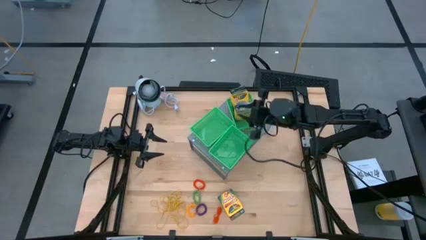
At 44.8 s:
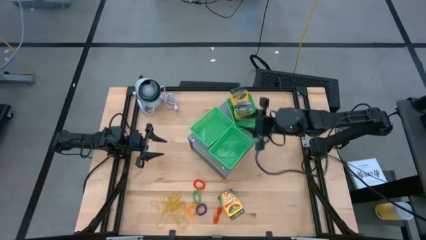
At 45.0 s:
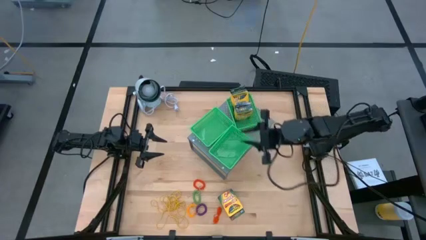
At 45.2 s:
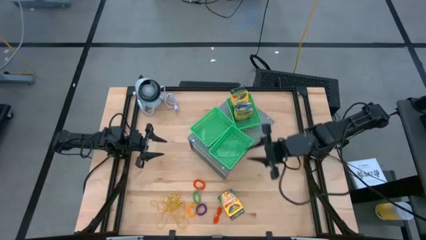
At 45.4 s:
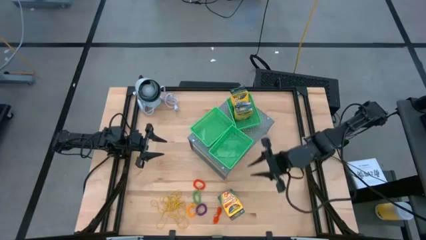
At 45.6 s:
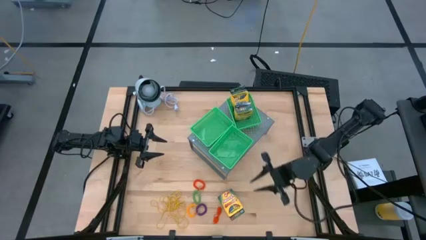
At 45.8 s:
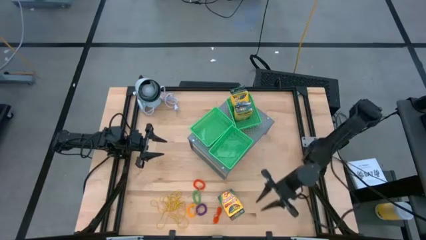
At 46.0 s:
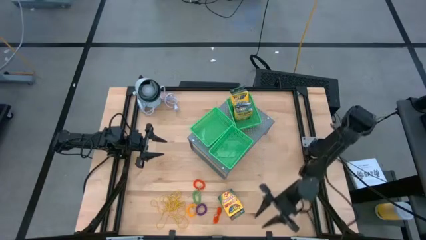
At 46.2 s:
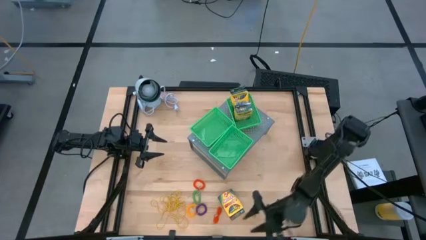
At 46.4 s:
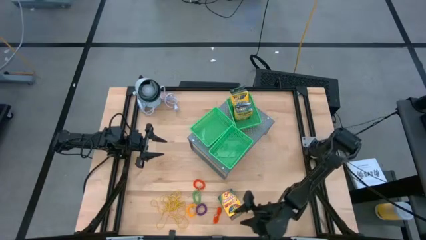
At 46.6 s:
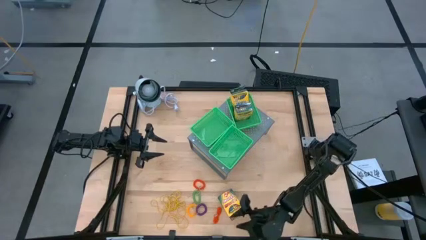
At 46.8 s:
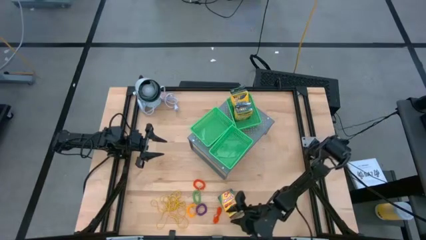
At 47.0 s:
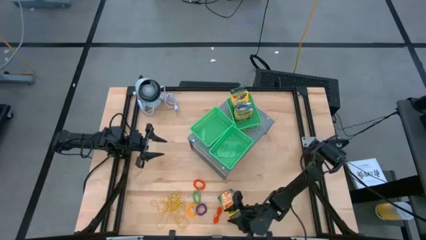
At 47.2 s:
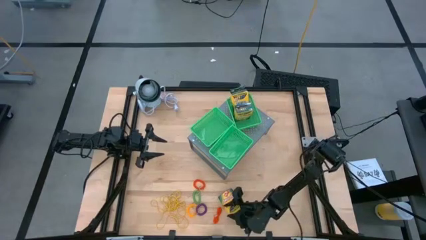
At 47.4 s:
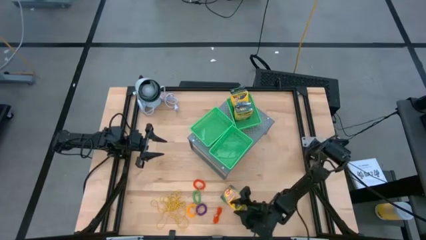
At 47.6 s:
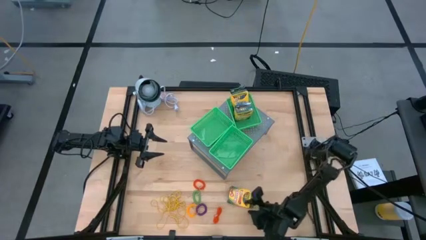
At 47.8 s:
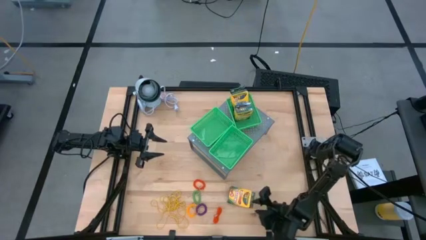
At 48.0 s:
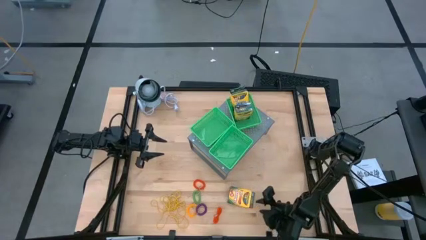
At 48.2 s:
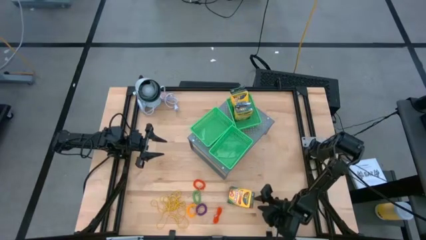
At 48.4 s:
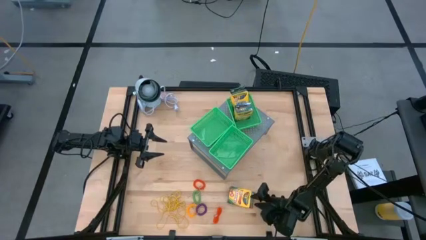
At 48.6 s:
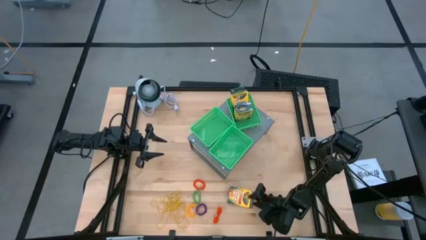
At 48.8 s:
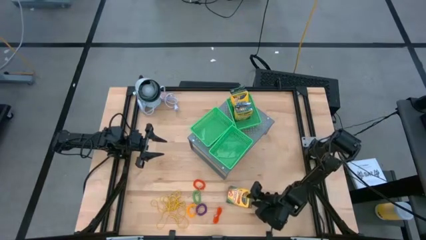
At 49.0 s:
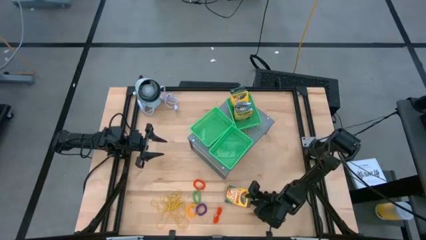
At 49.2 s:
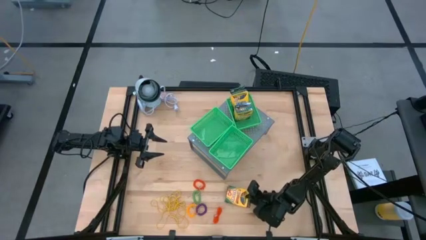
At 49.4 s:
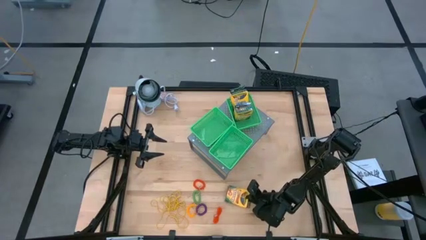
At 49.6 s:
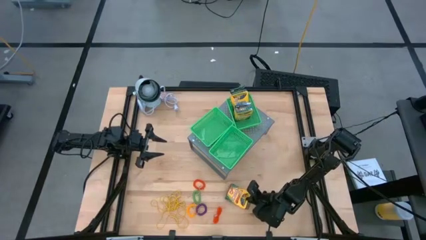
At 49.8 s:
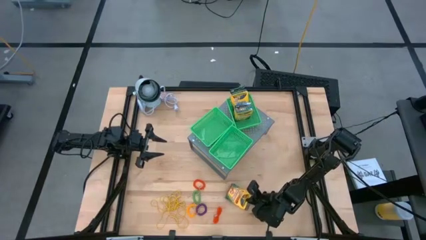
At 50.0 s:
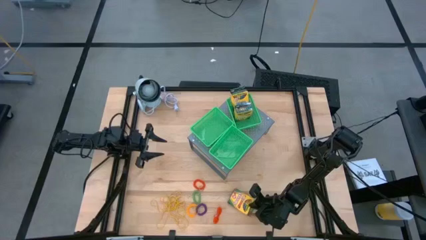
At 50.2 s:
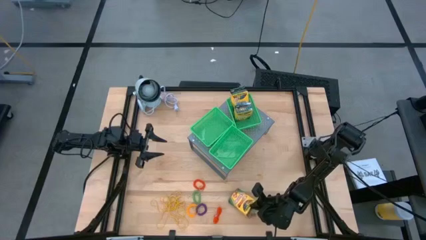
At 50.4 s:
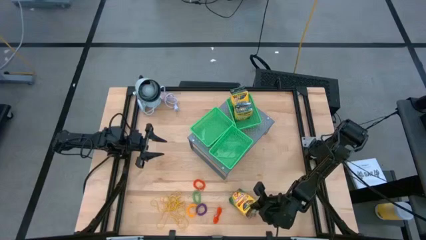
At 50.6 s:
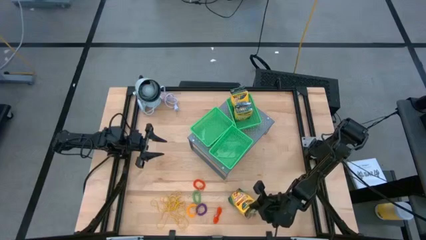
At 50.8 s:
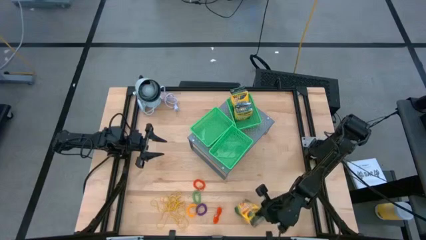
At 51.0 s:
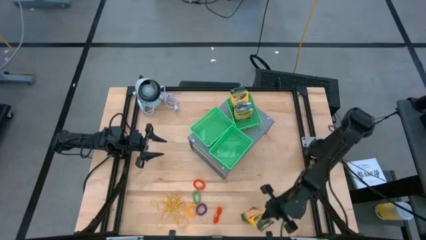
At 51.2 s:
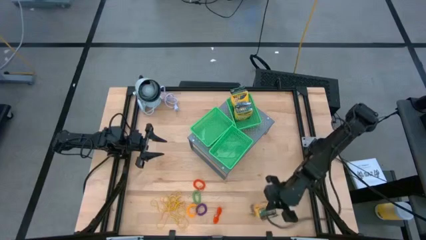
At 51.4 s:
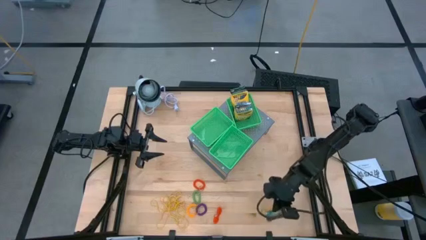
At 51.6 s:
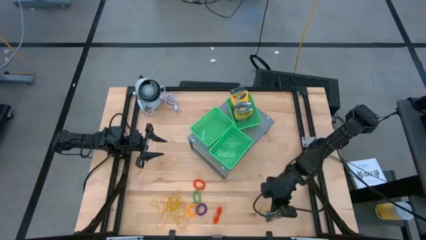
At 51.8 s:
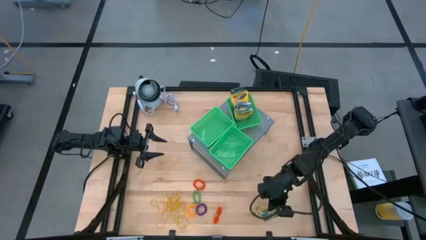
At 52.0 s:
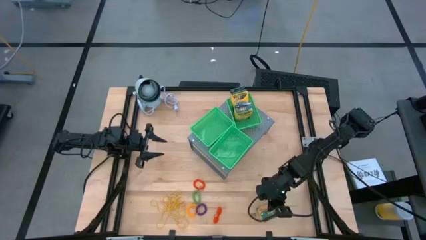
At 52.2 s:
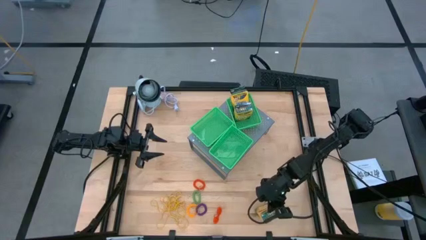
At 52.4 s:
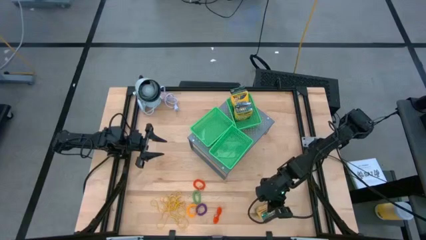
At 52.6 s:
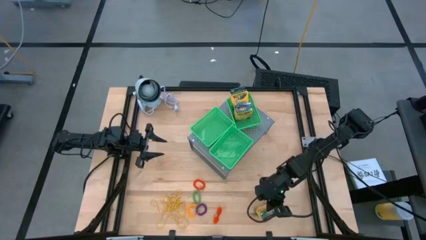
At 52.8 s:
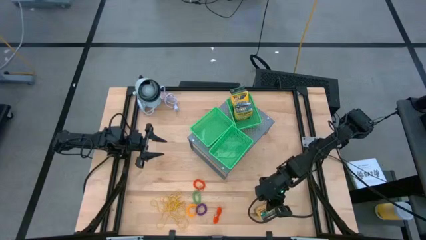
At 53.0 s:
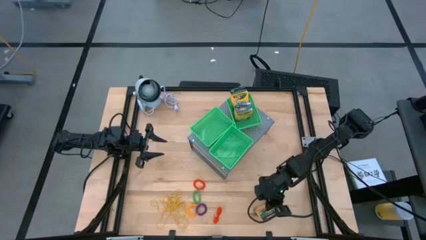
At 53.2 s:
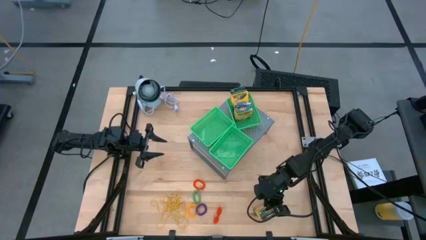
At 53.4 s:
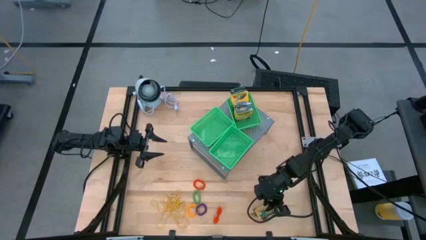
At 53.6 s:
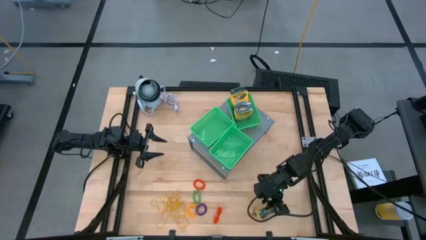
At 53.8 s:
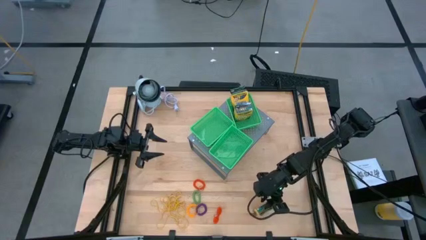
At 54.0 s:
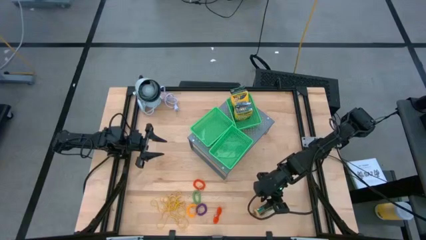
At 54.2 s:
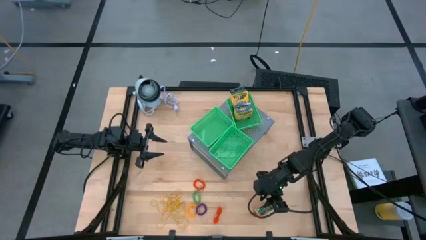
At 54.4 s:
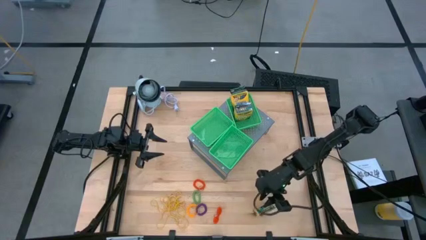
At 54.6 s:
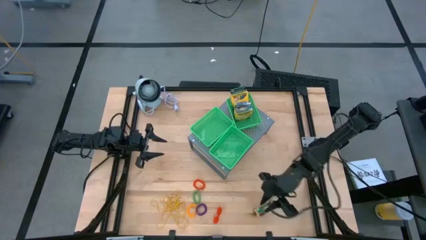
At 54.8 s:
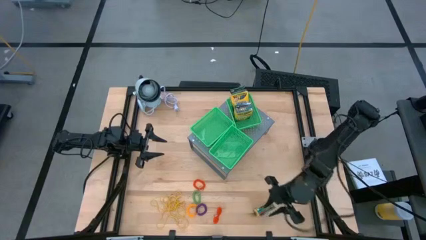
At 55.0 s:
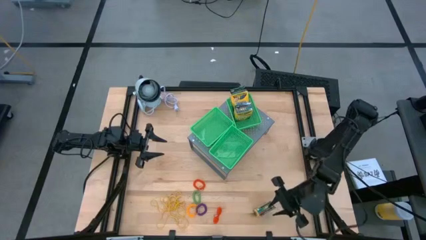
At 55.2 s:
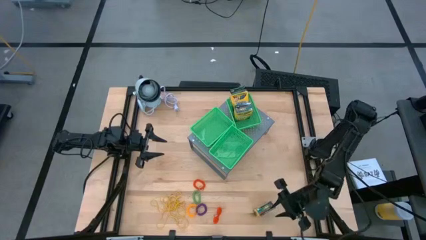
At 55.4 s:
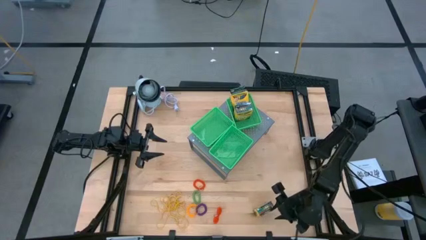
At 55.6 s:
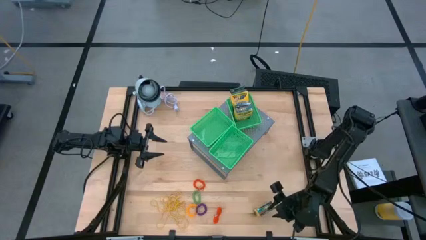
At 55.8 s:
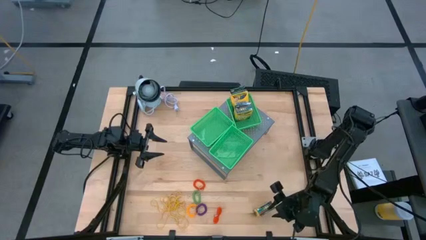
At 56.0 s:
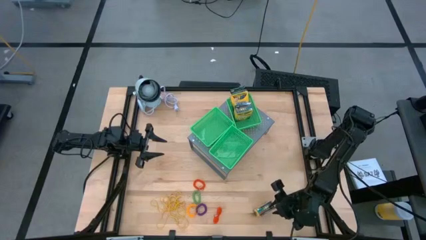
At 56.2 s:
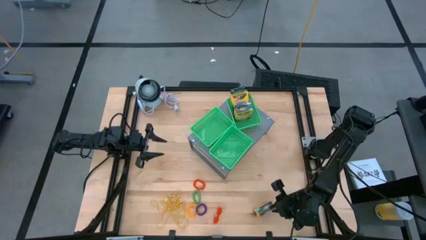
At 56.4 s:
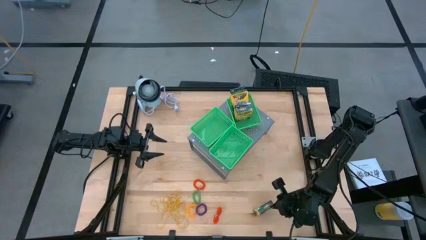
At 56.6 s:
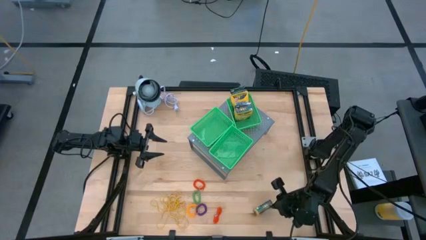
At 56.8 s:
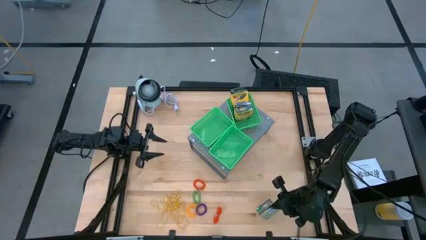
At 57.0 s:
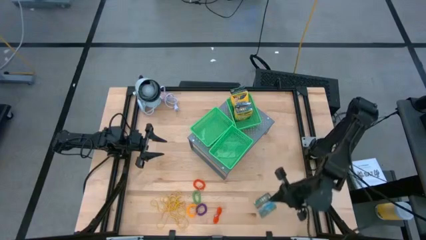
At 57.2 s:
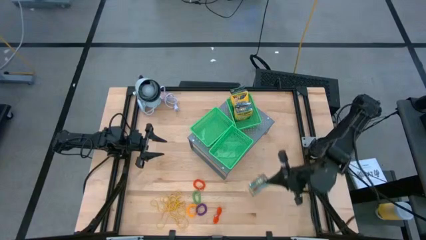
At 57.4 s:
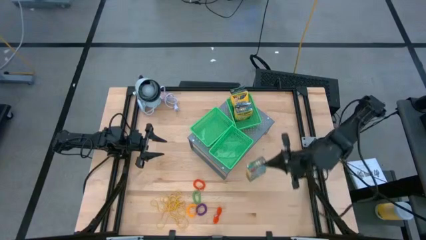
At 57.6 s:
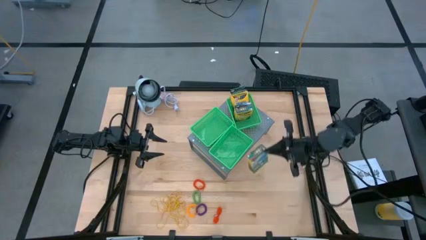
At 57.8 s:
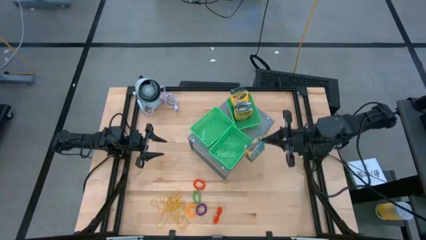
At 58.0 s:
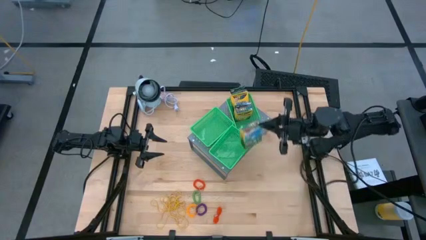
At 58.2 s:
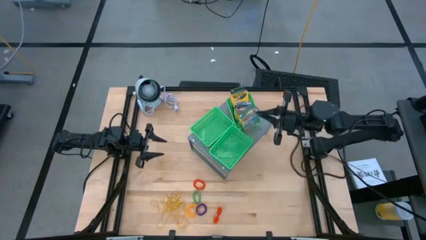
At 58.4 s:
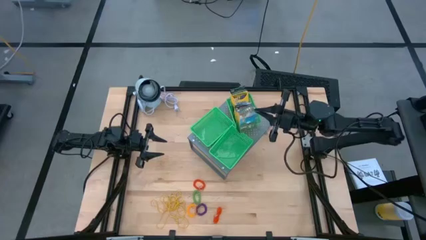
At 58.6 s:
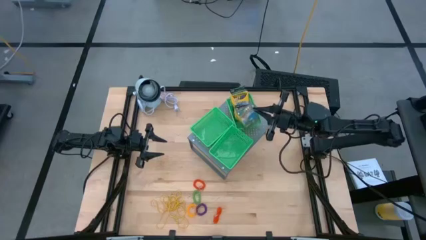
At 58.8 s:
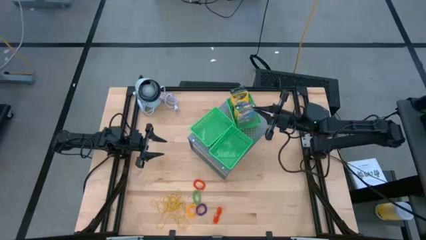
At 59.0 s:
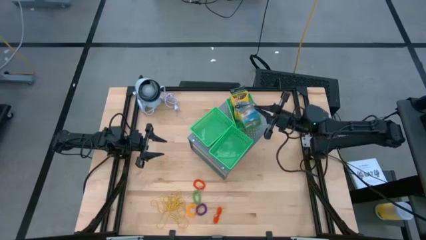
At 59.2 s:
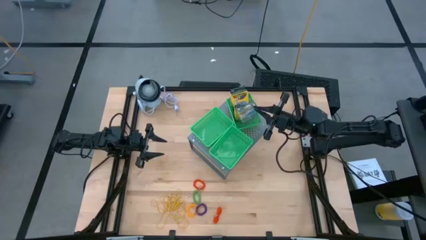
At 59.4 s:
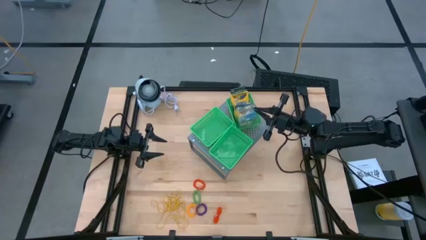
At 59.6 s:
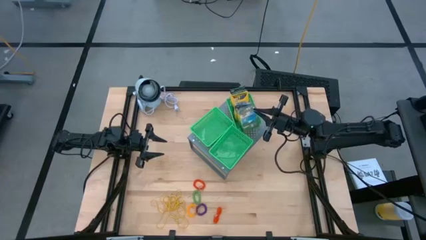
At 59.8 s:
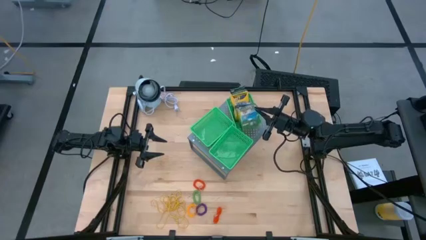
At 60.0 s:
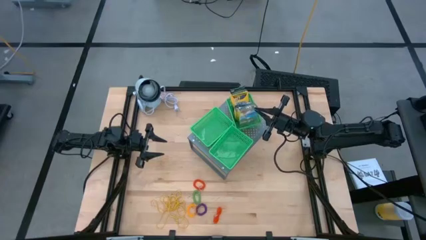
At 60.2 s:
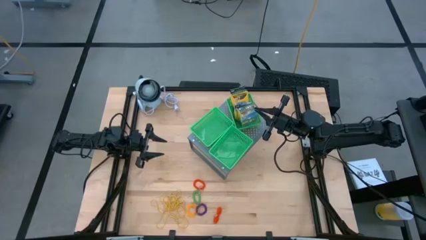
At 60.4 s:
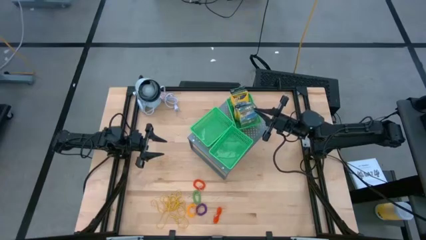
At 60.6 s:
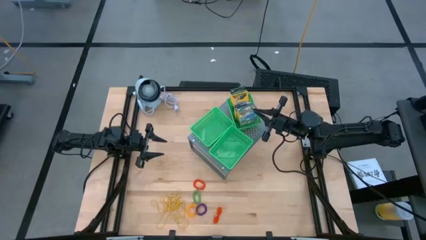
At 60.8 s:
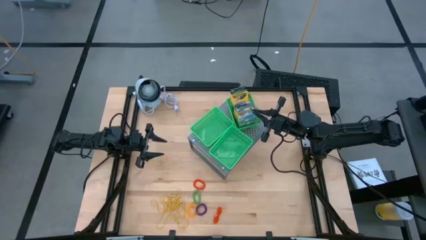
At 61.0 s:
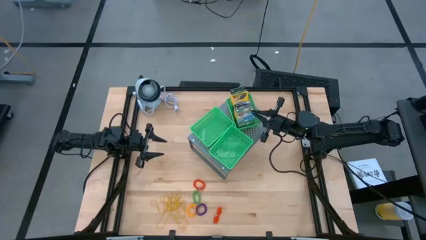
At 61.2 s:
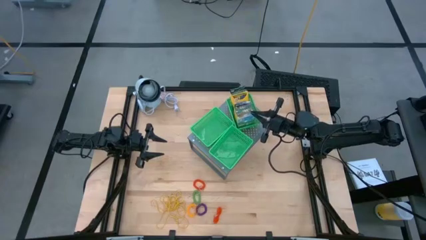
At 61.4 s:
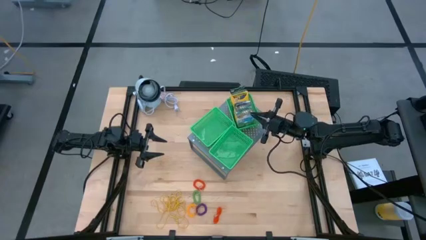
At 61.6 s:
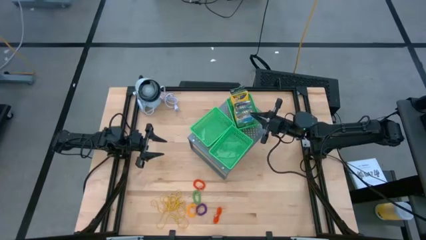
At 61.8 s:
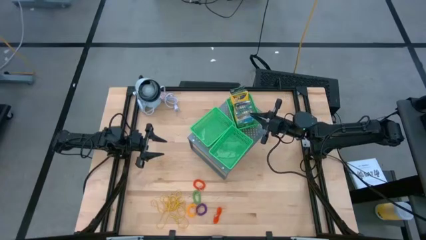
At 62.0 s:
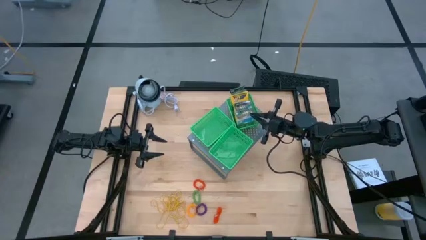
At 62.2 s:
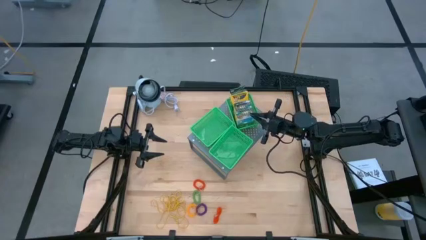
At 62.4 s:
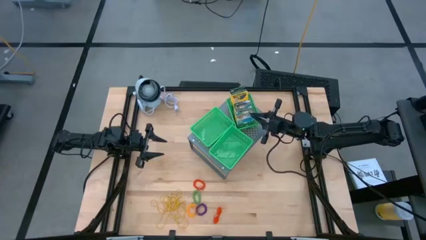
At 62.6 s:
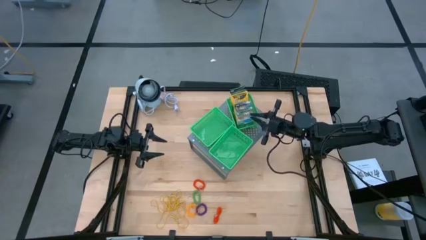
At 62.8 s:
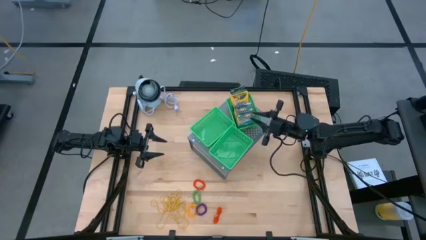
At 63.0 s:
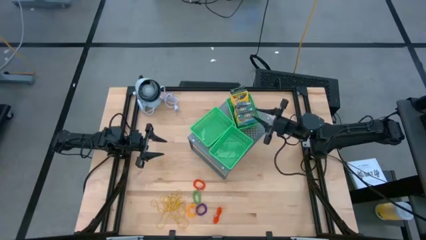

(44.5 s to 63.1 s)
Task: Pick & Place Office Desk Supplies
Put the yellow crayon box into the top right green bin on the shelf
